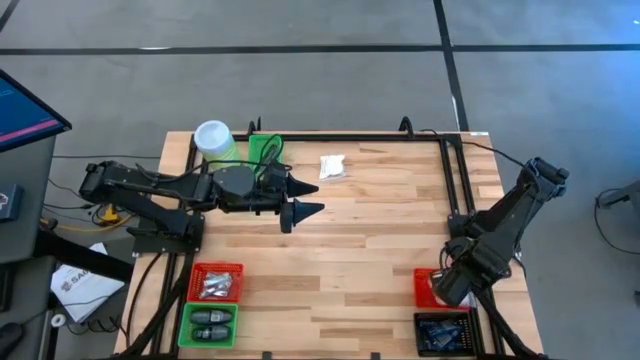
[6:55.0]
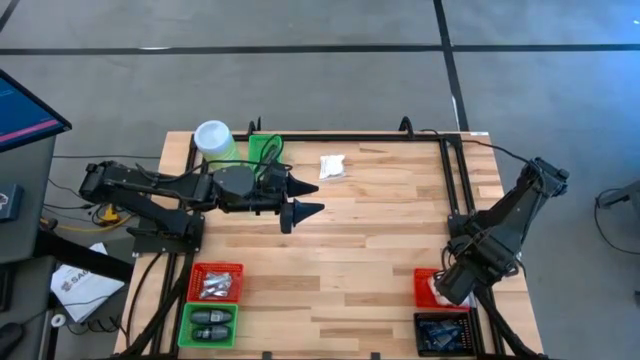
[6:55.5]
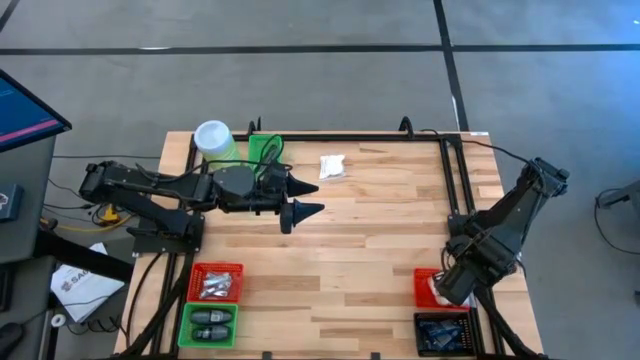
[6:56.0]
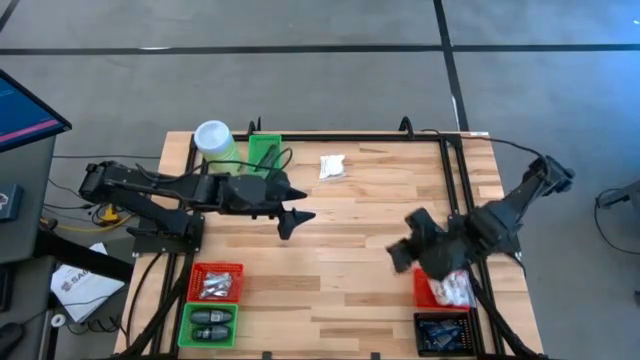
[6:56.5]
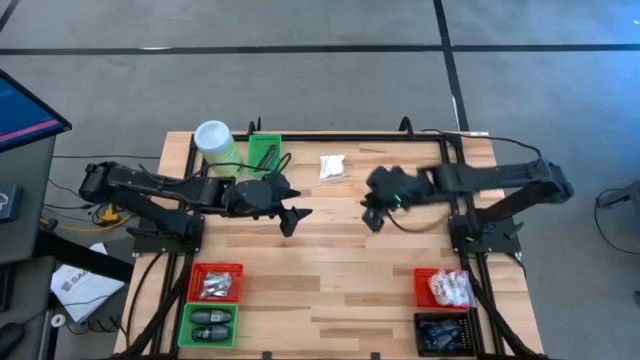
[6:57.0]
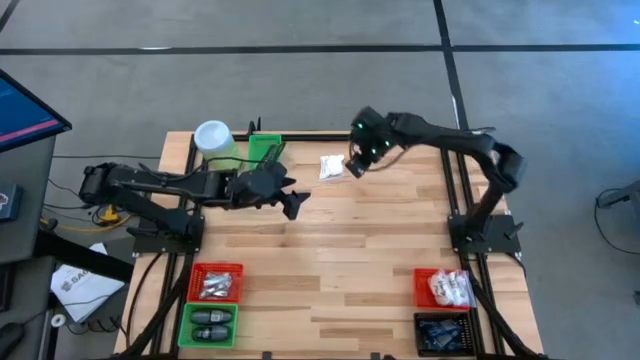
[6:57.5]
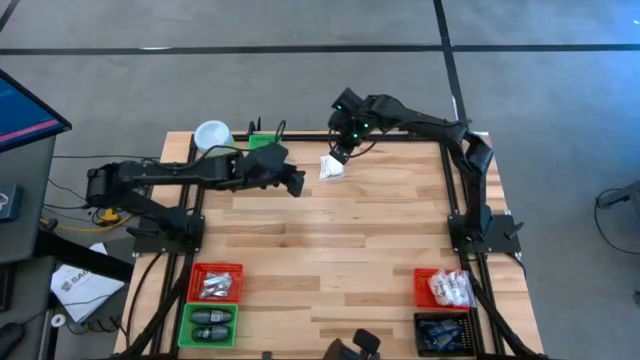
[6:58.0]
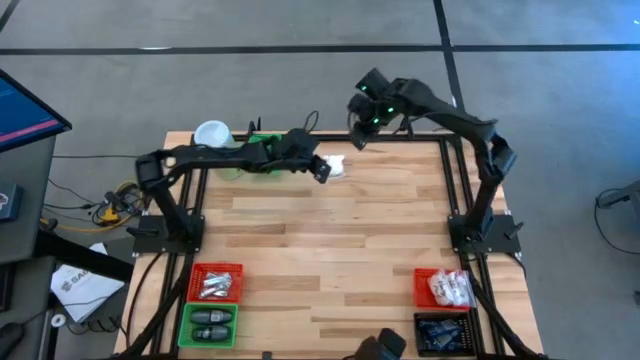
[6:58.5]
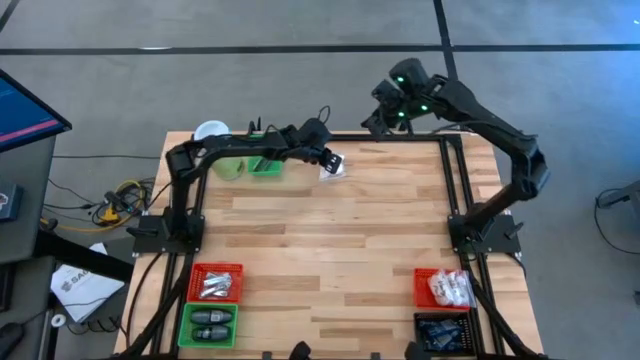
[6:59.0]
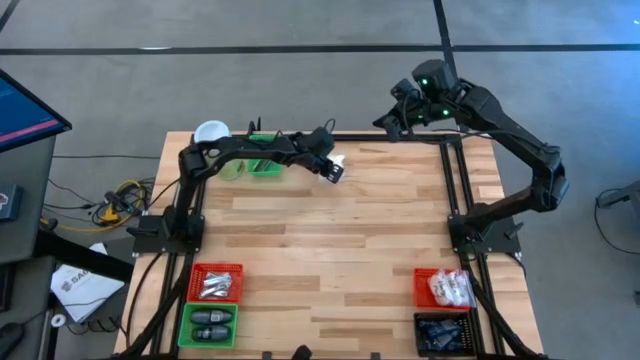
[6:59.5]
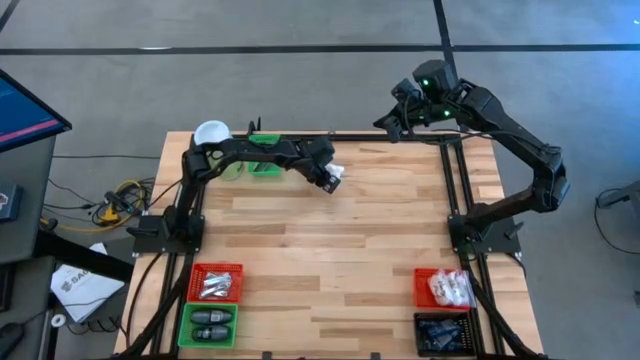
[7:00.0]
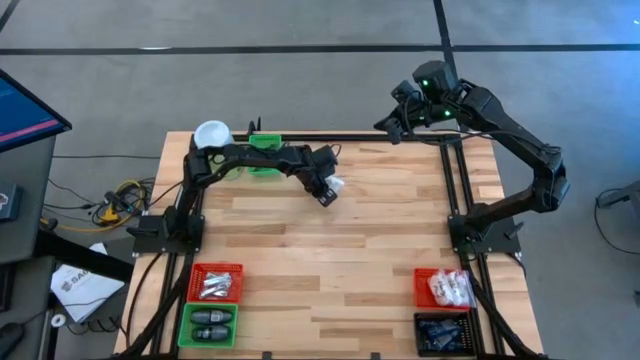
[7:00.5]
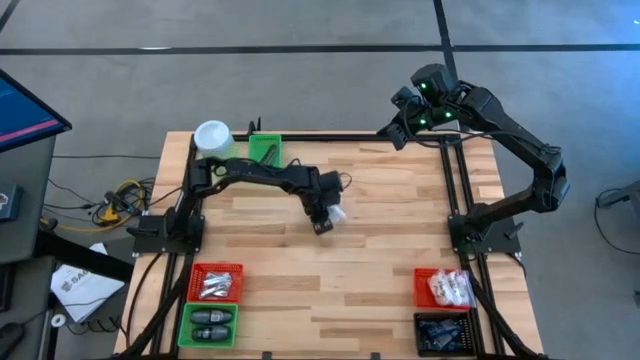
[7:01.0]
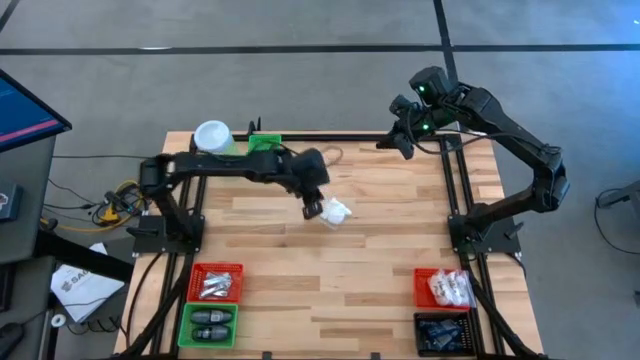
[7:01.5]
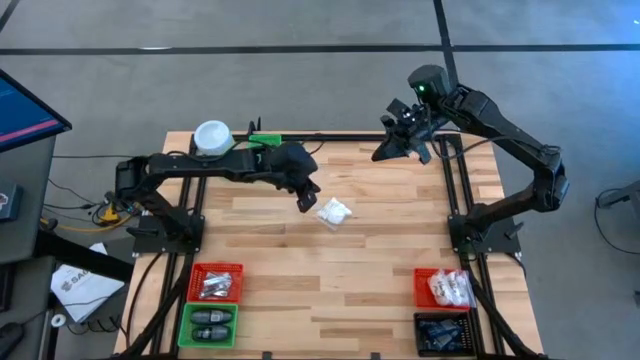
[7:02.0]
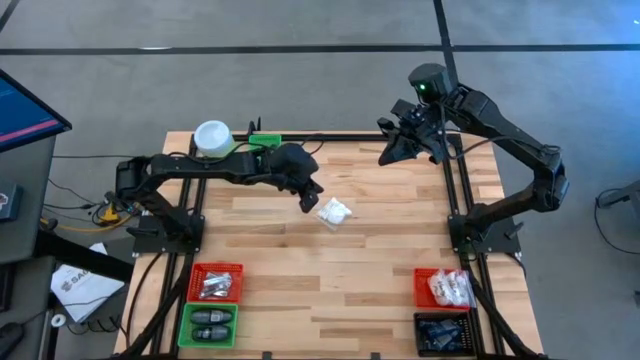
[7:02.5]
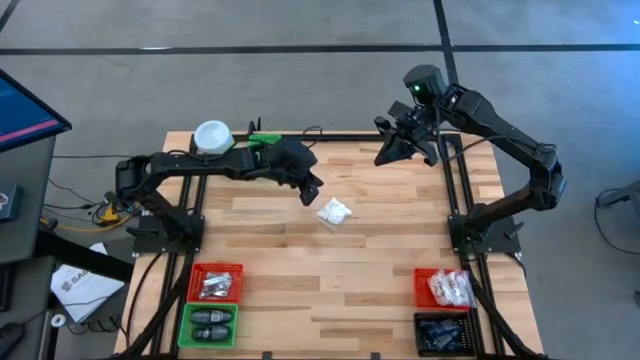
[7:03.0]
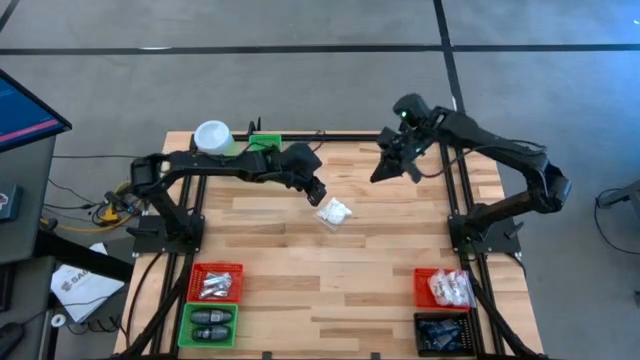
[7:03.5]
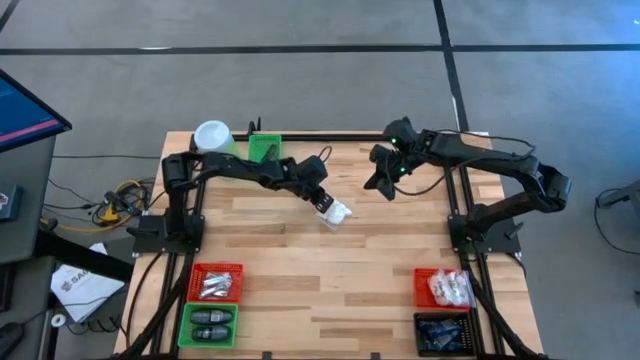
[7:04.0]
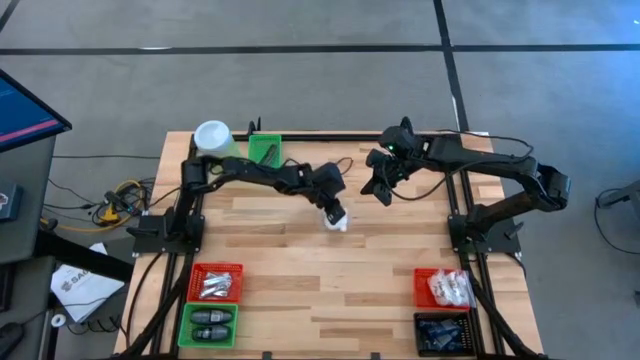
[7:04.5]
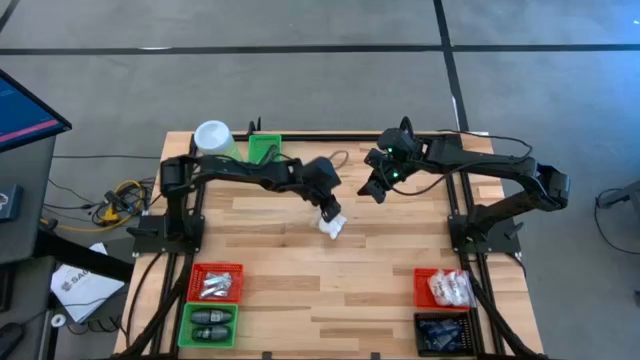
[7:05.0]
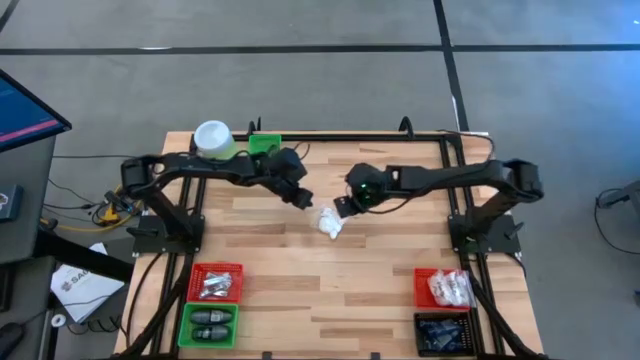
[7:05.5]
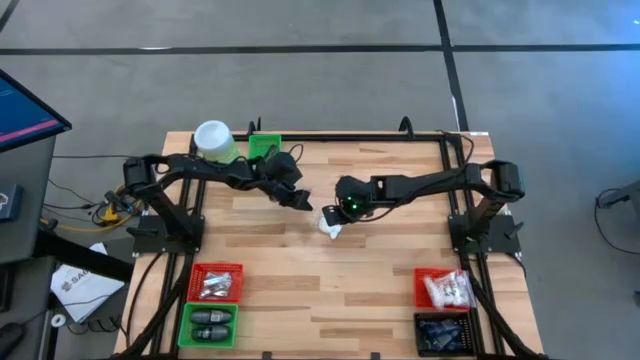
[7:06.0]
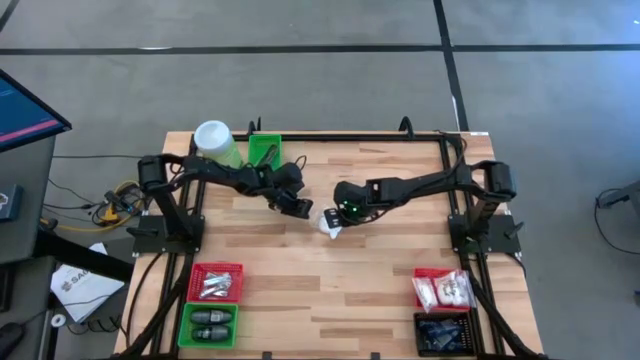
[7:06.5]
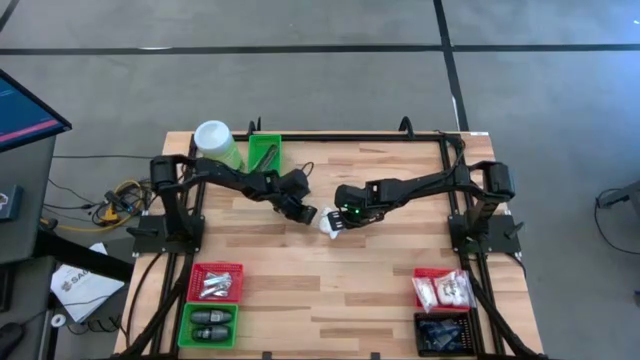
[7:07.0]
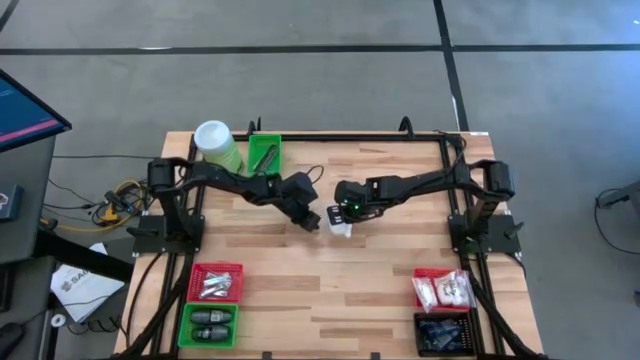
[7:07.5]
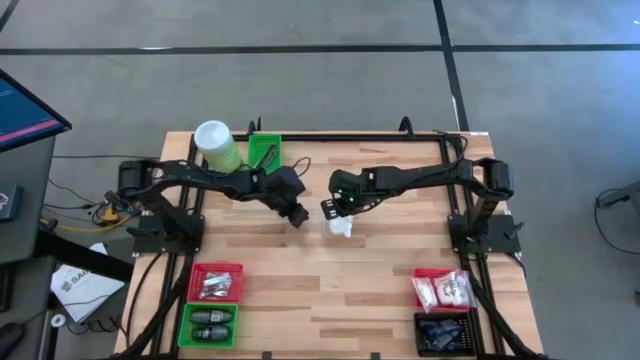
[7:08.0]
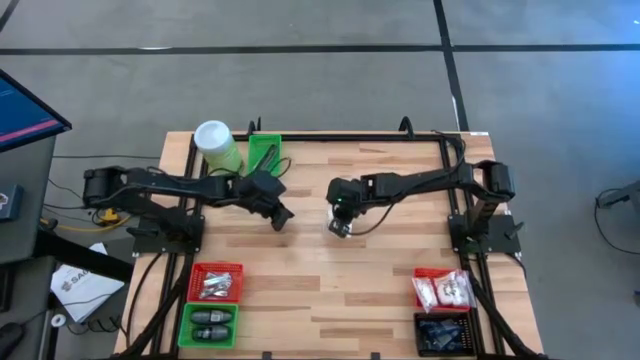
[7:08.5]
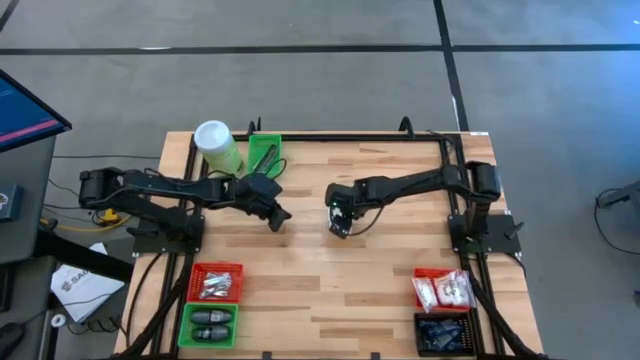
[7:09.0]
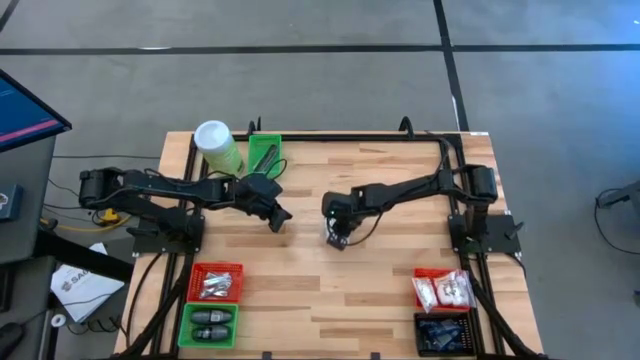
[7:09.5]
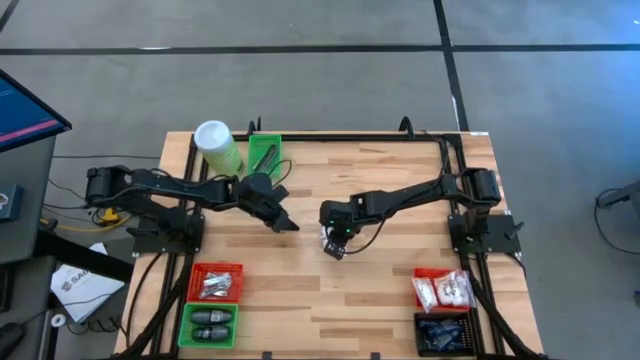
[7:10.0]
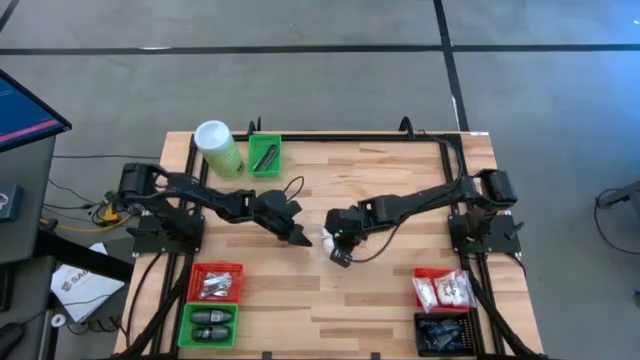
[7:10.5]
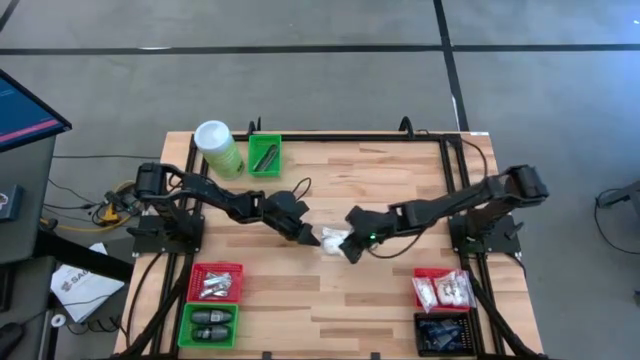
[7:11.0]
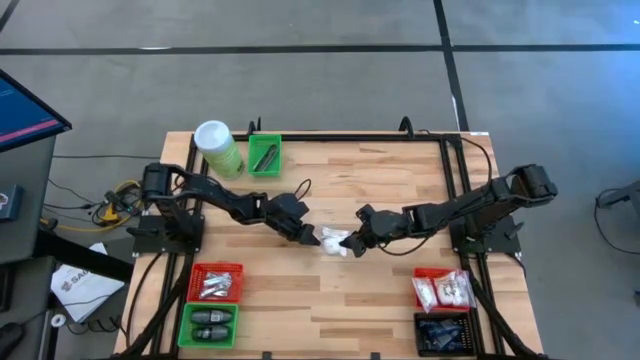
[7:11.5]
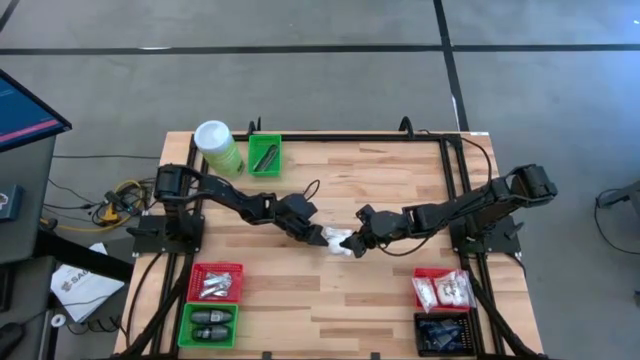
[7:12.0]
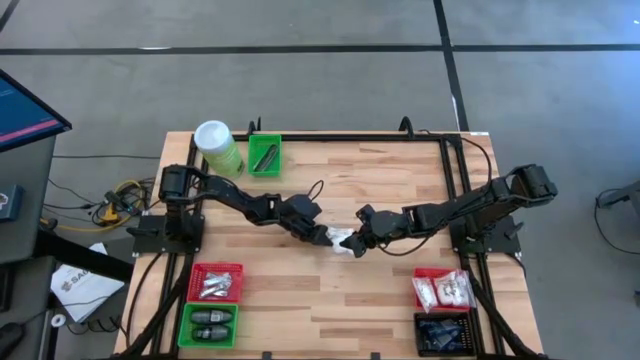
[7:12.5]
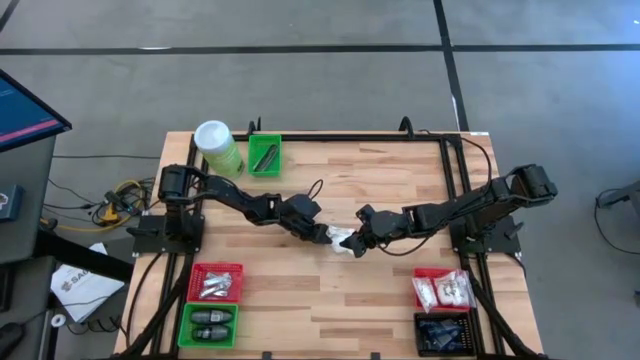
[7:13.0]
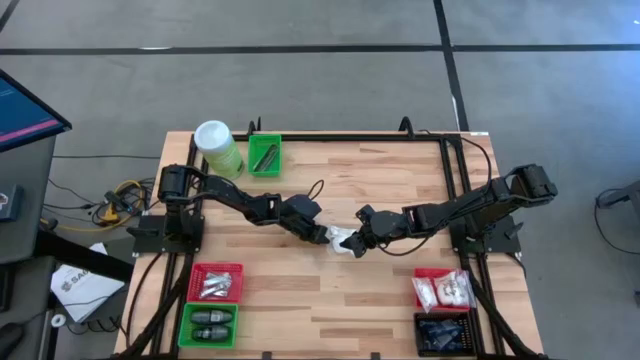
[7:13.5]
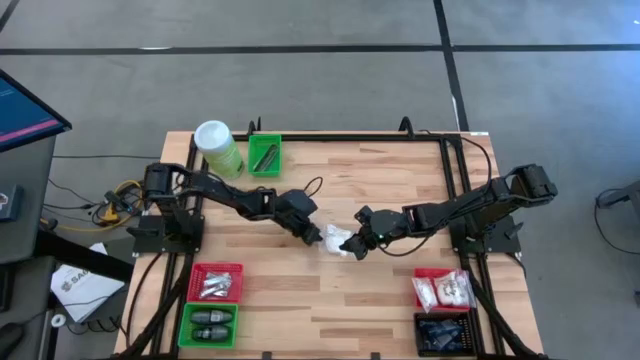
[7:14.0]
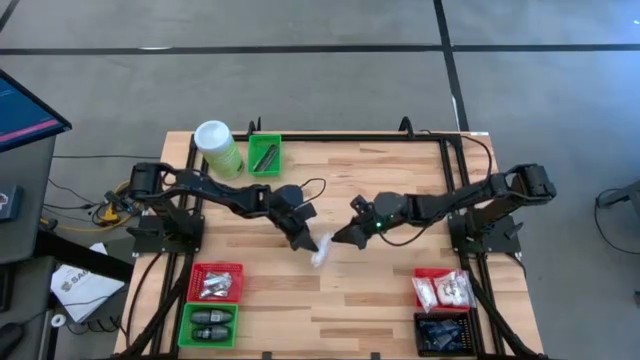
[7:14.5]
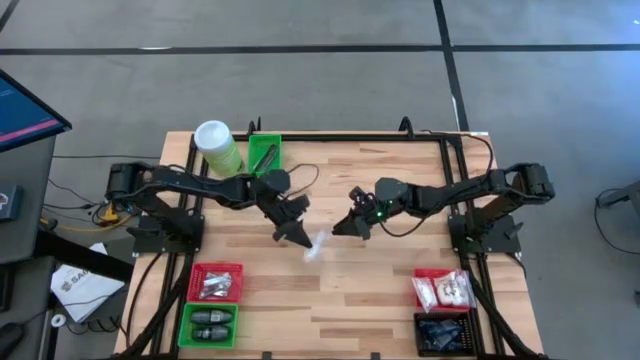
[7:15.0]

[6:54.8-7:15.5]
Task: Pick & Place Travel size toiletries
Put the cotton pack into the right red bin
